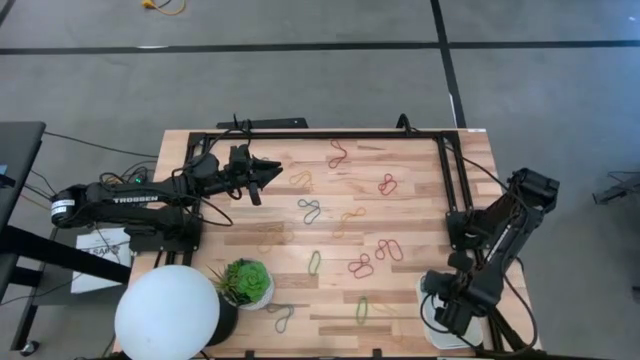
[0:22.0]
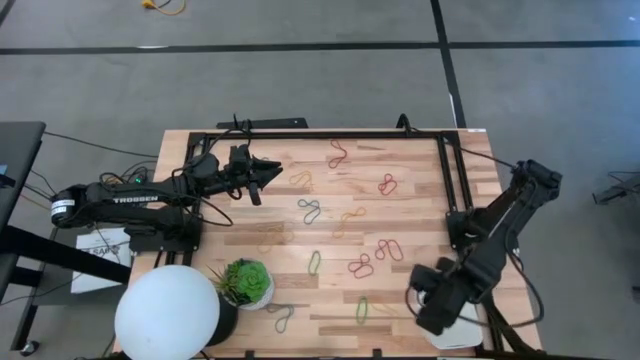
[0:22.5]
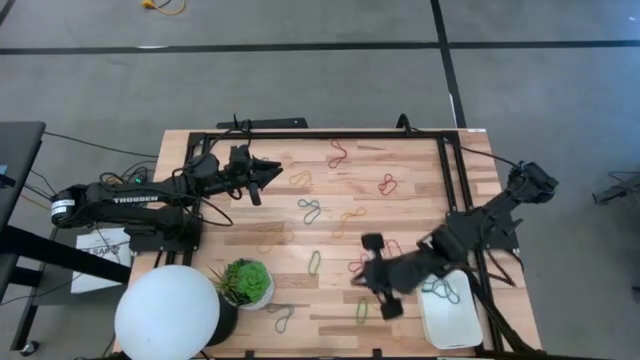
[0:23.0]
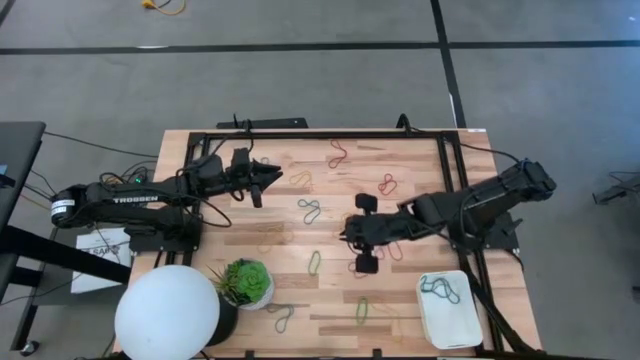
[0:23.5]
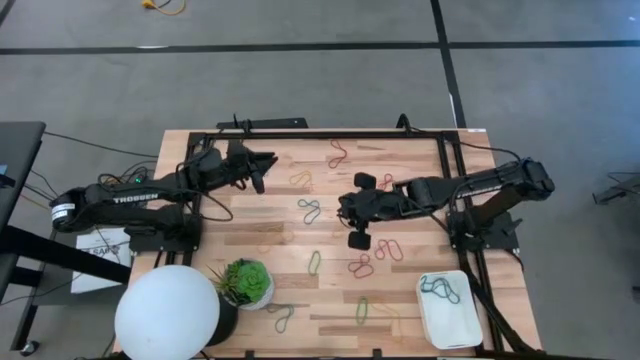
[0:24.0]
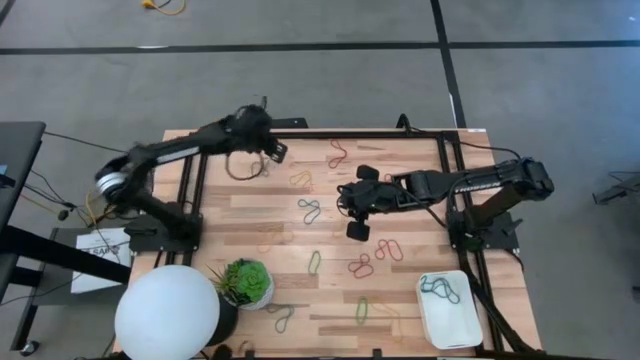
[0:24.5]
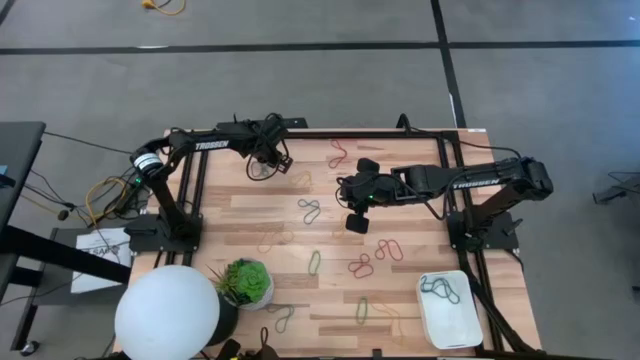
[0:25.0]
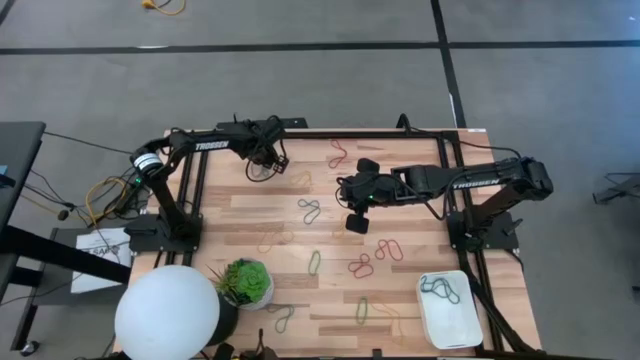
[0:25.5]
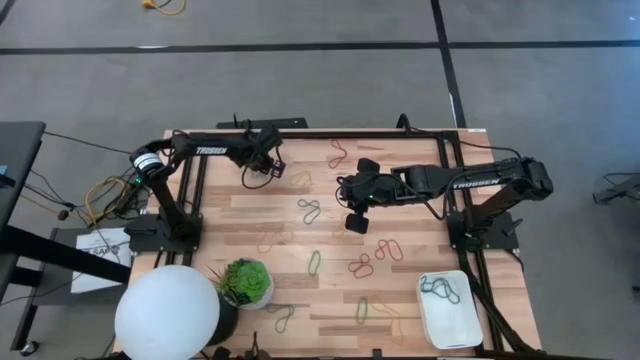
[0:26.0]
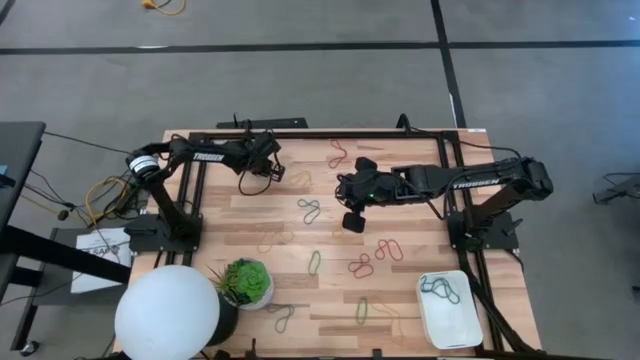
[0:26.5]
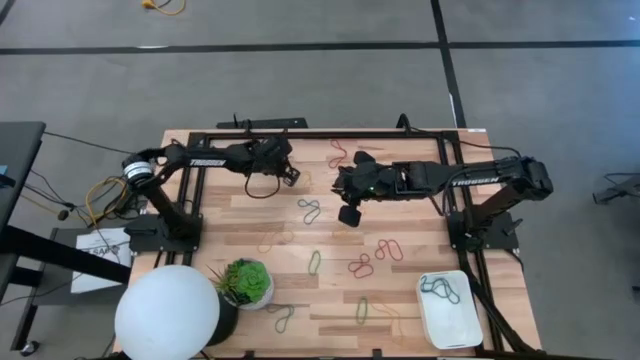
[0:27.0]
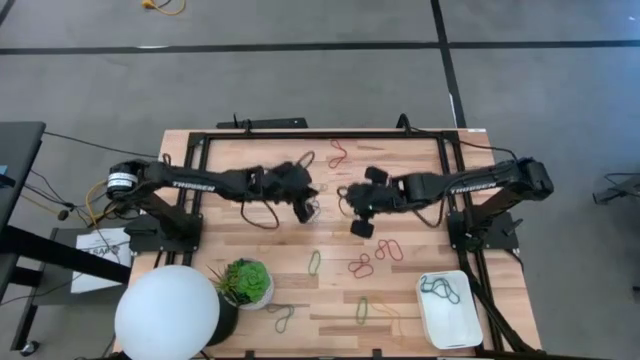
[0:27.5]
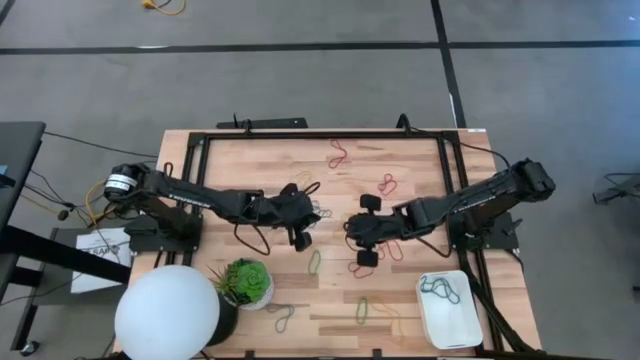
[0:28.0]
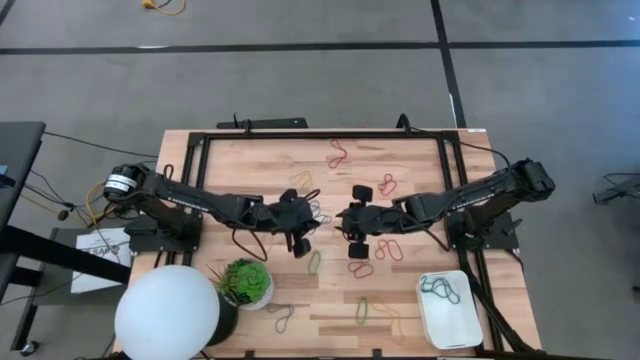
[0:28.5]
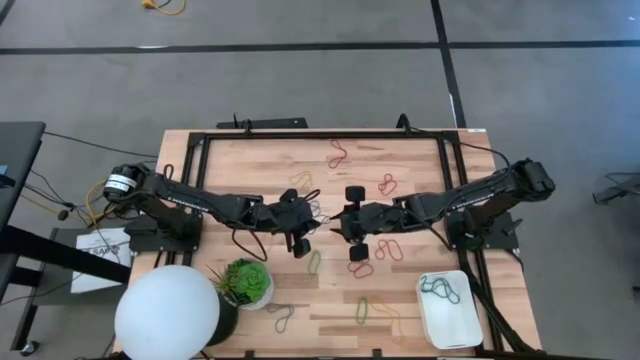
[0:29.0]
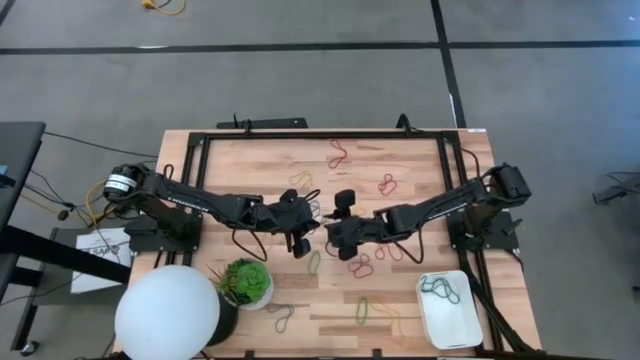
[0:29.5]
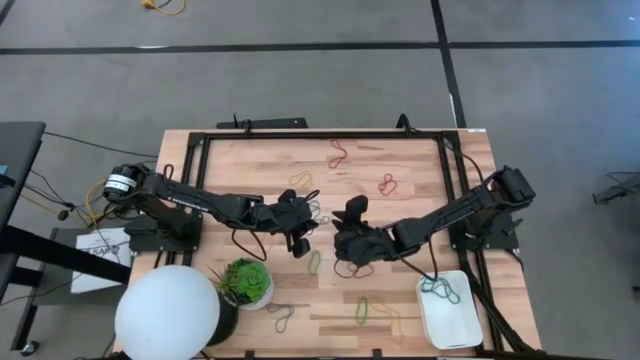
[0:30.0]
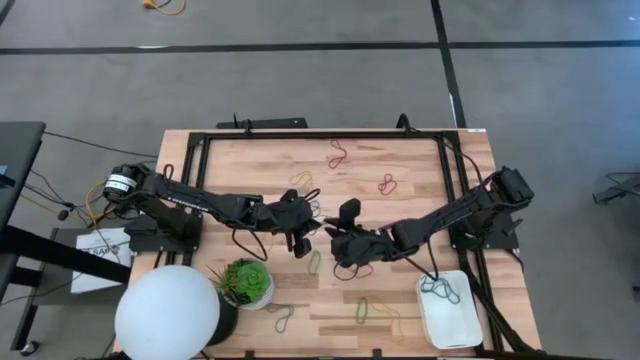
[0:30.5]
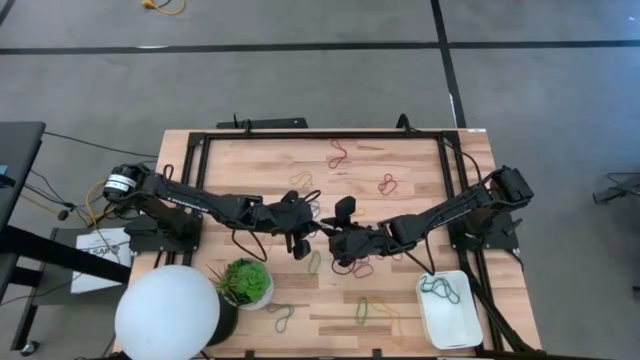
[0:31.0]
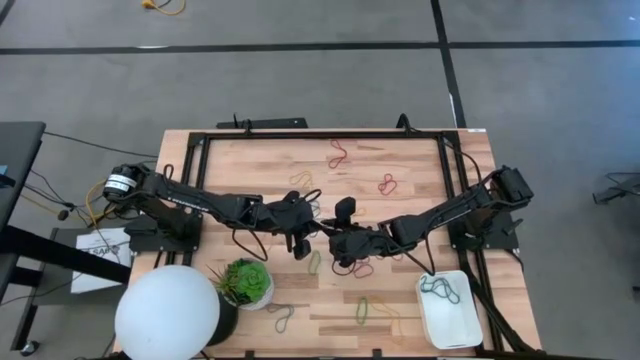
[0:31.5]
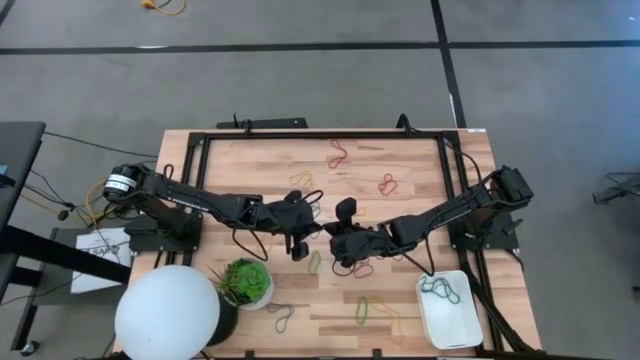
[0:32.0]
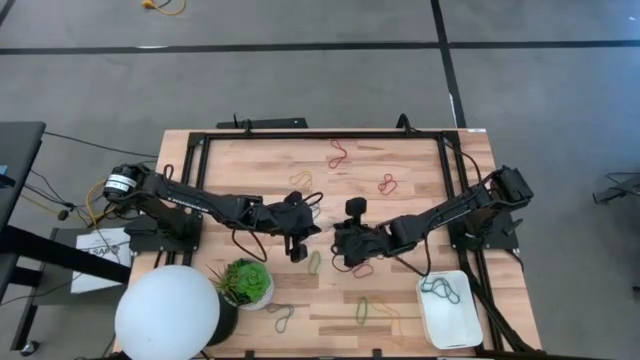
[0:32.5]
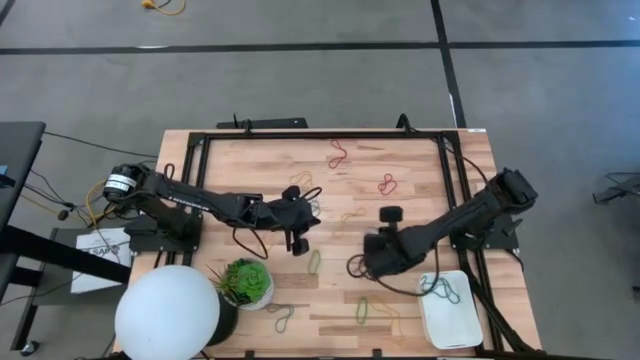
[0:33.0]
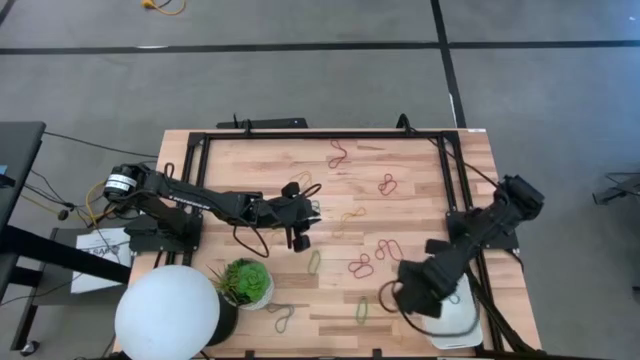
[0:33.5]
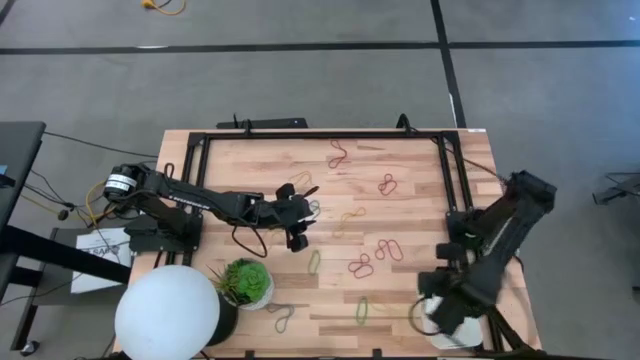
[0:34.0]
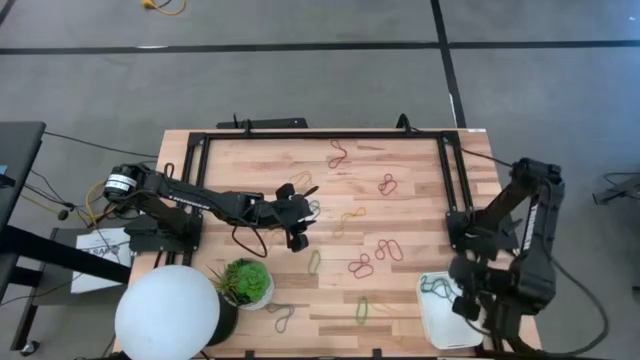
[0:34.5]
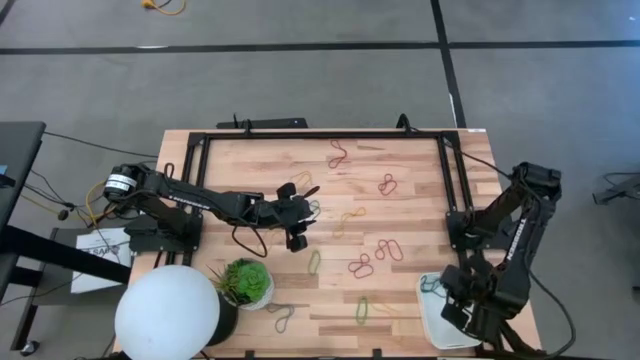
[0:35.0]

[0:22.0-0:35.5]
Task: Pick and place items into bin
Put the blue rubber band into the white bin

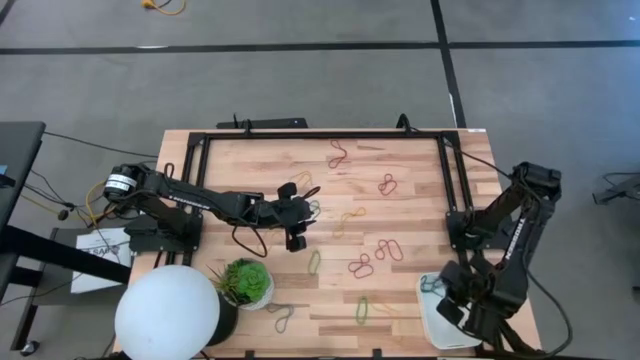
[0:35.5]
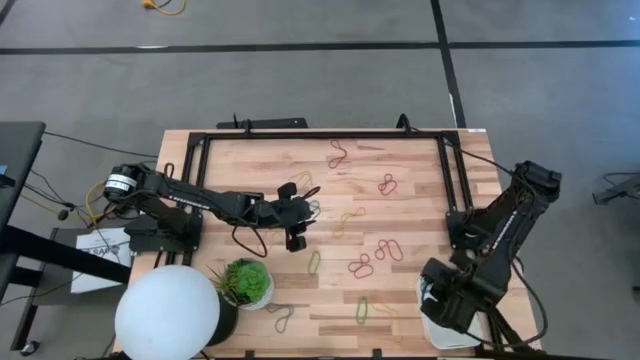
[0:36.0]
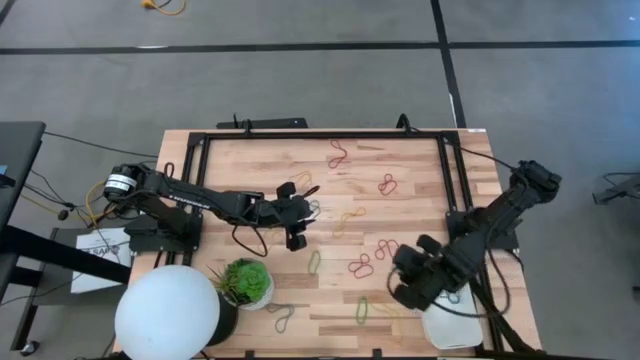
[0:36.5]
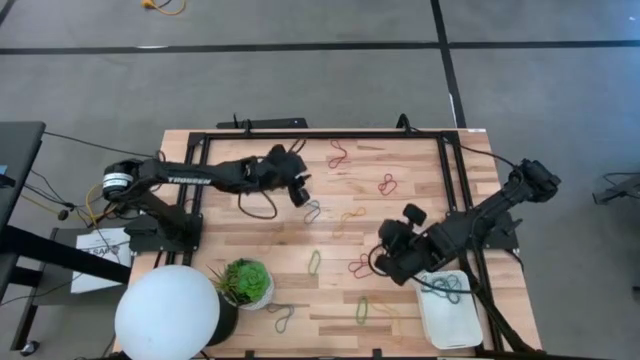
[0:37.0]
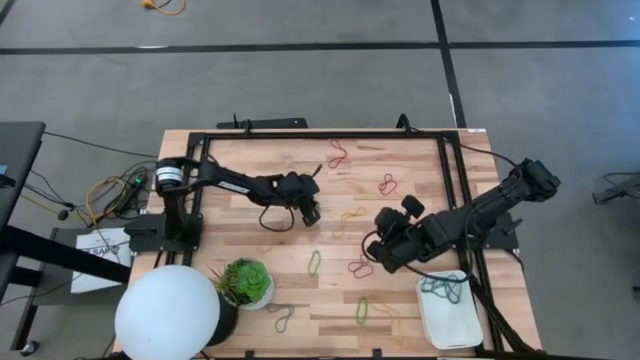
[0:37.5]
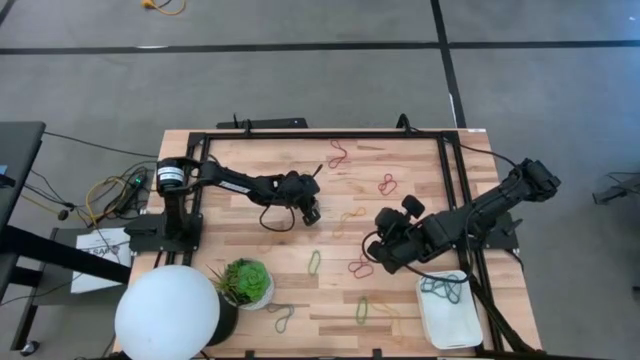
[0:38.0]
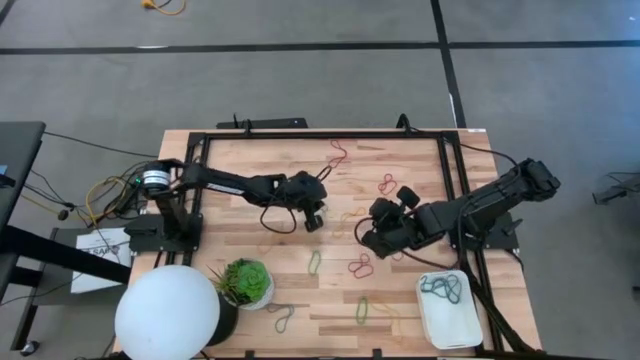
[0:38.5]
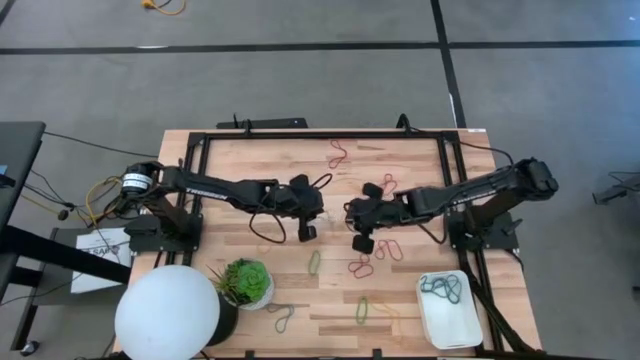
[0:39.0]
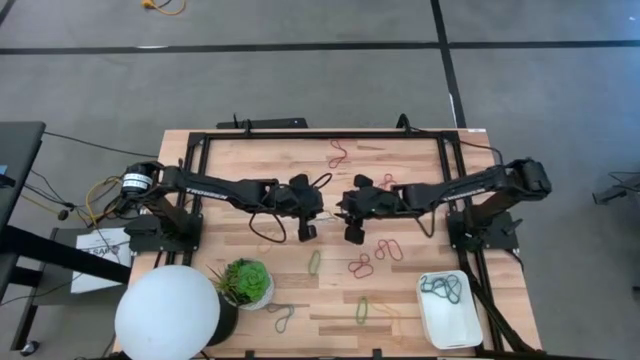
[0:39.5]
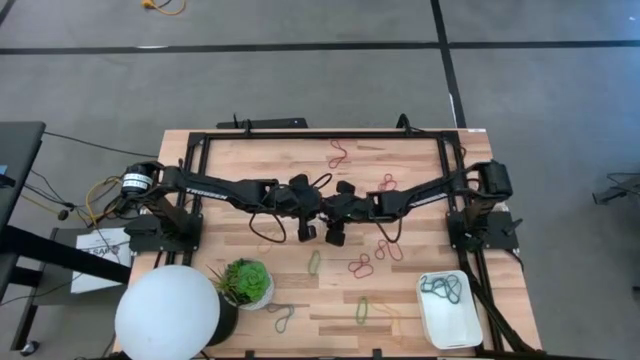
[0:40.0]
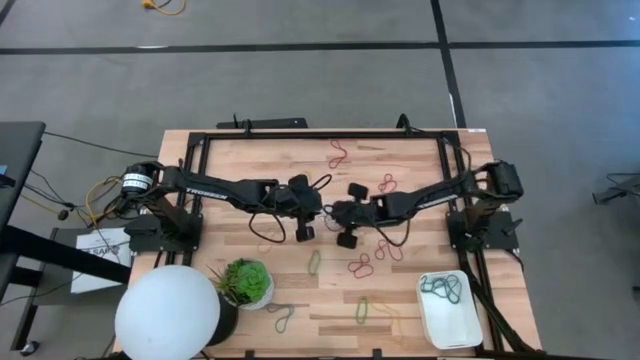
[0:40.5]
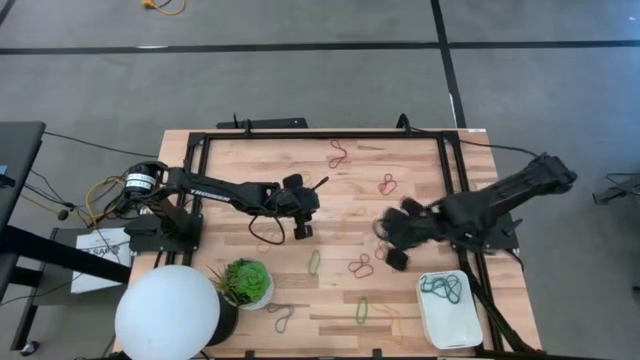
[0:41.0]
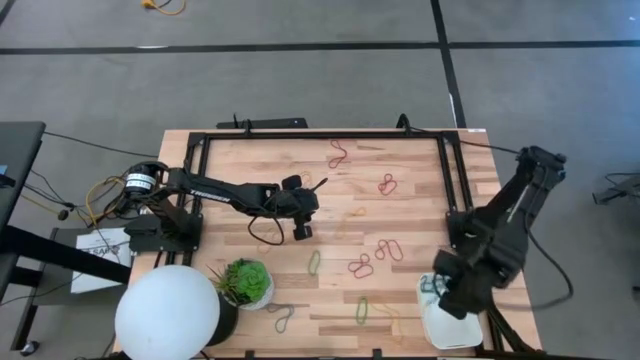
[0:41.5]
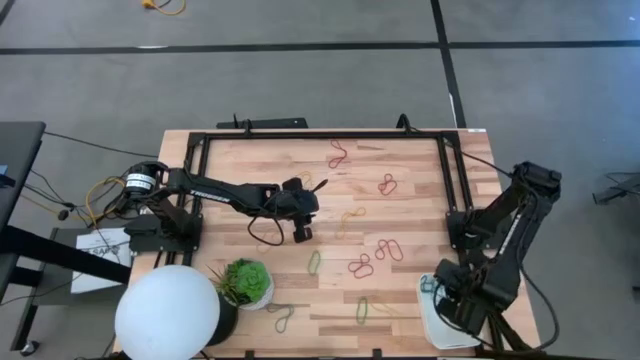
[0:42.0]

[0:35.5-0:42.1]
Put the blue rubber band into the white bin
